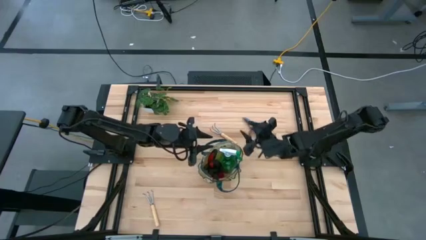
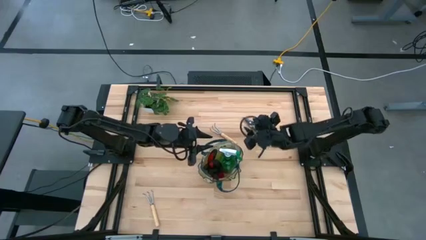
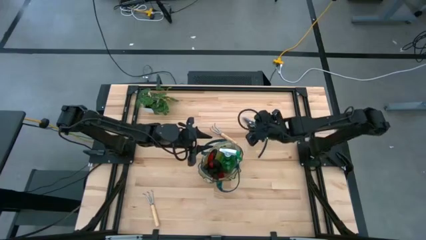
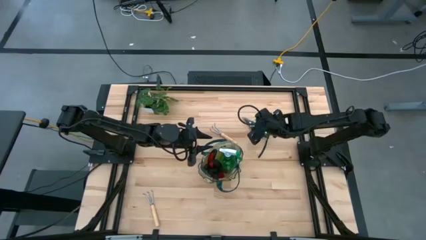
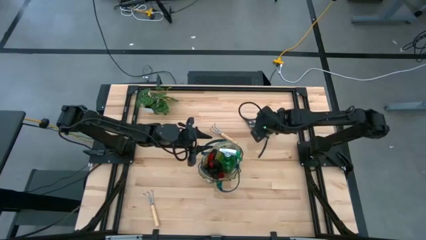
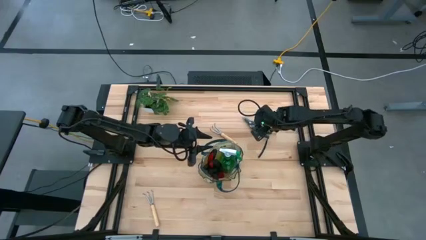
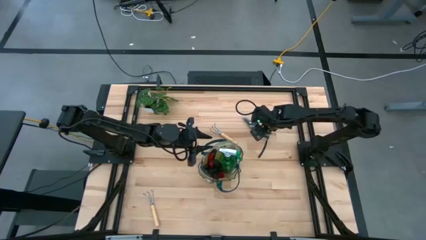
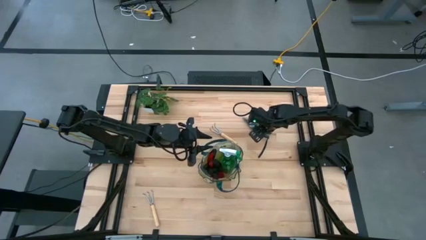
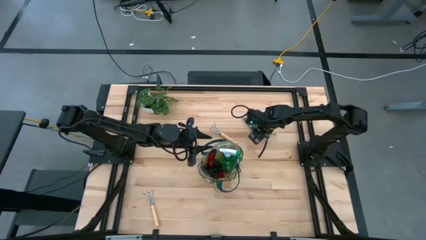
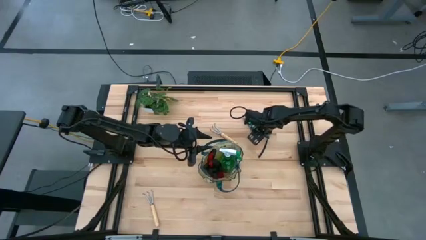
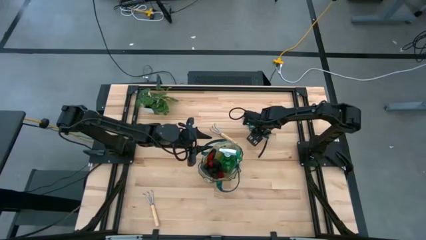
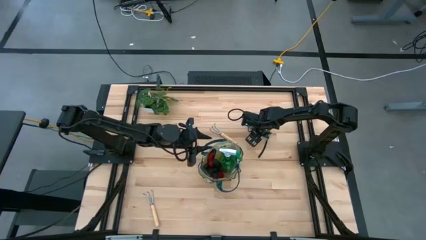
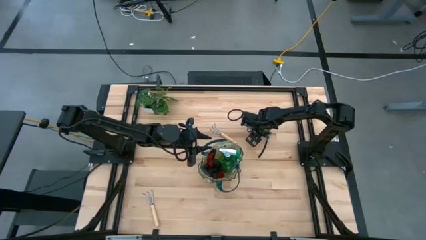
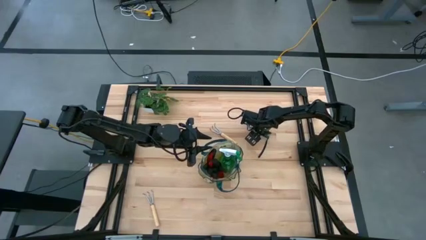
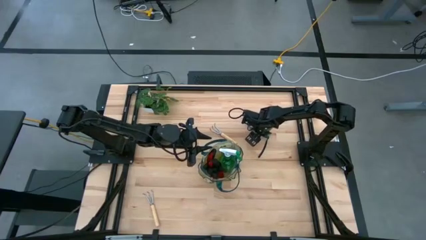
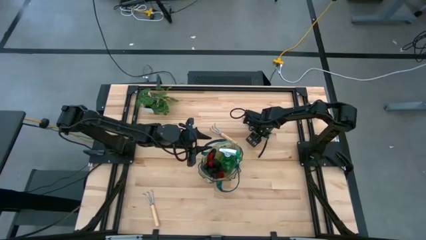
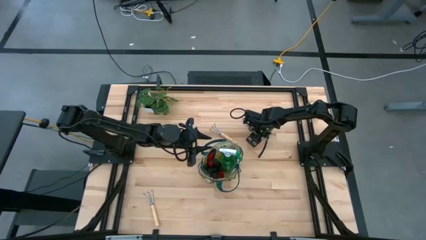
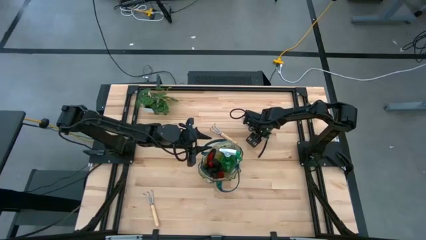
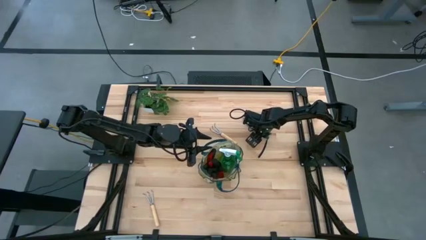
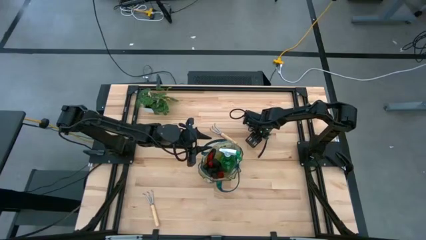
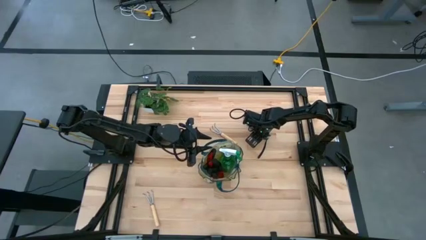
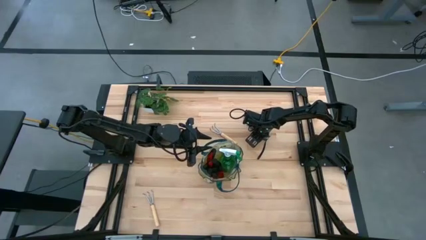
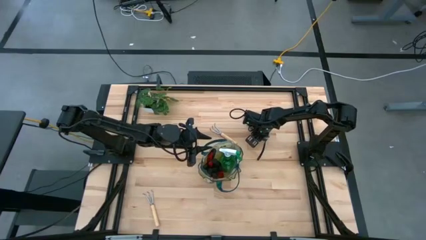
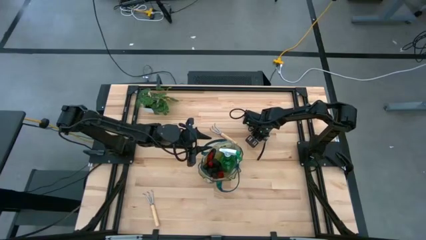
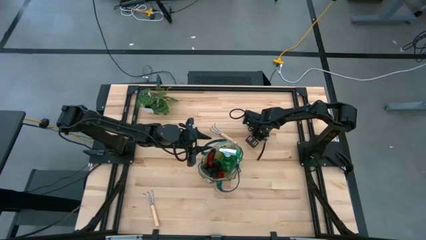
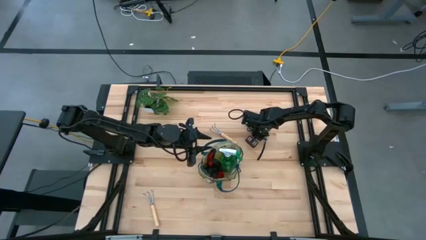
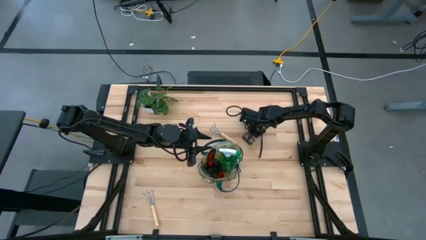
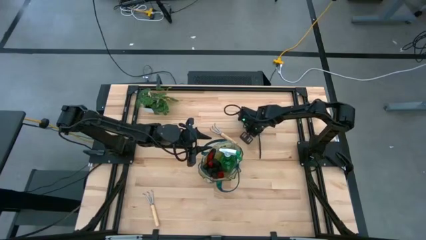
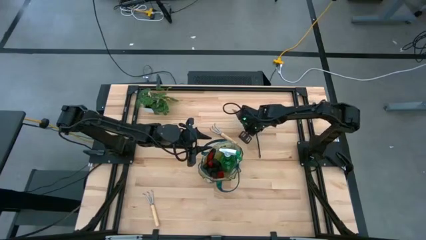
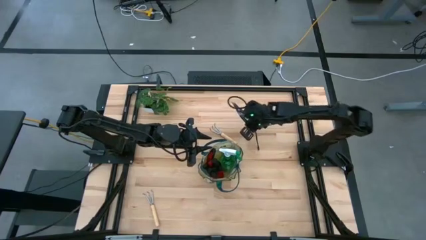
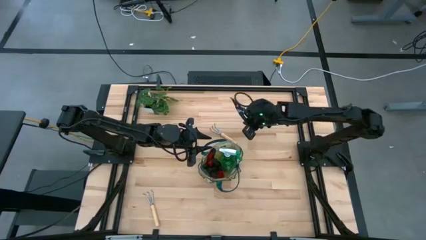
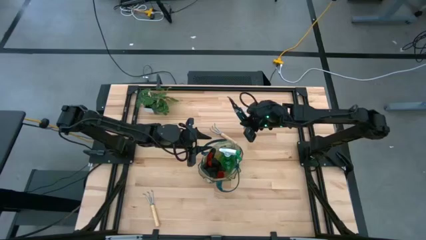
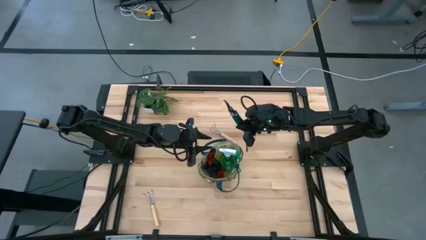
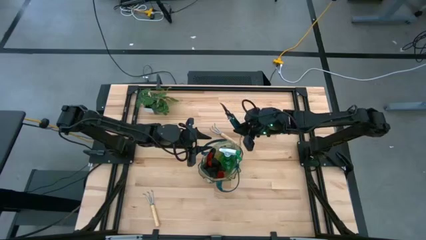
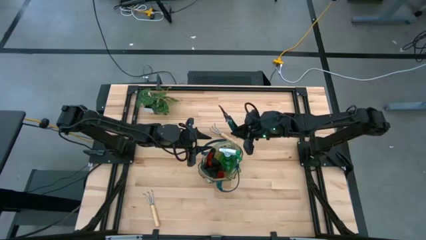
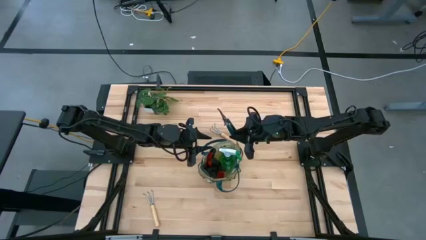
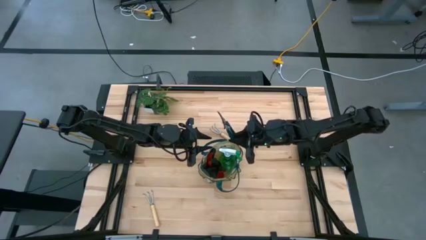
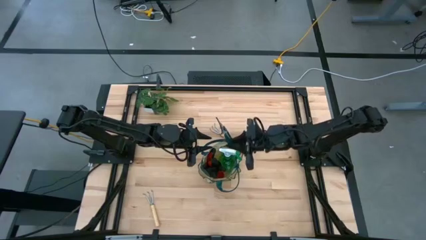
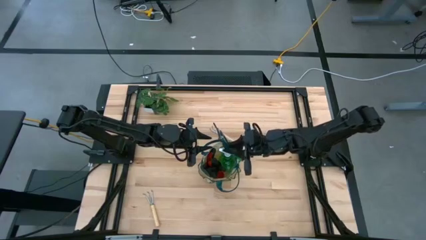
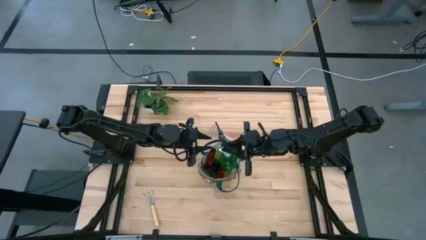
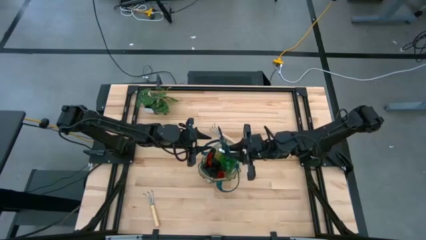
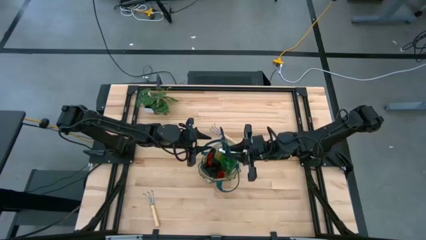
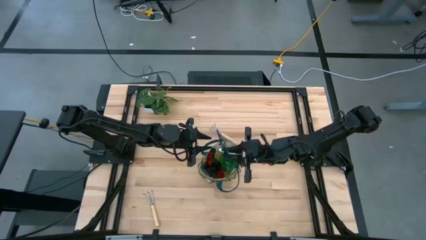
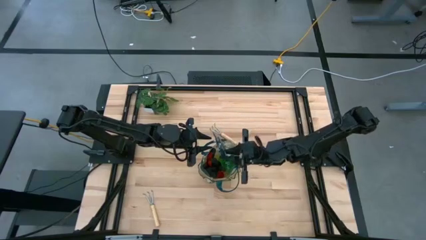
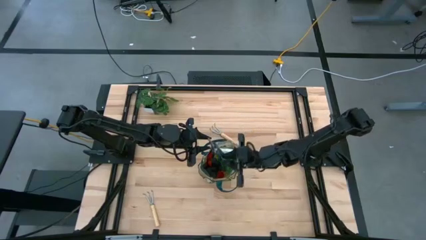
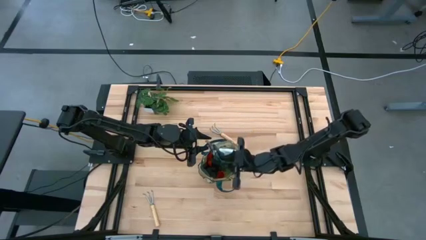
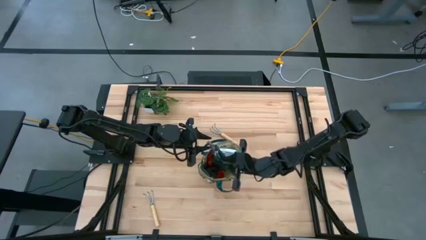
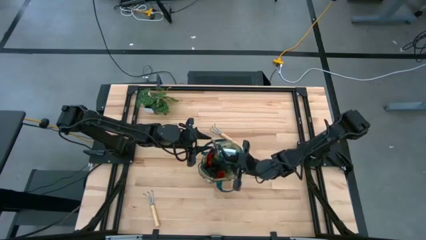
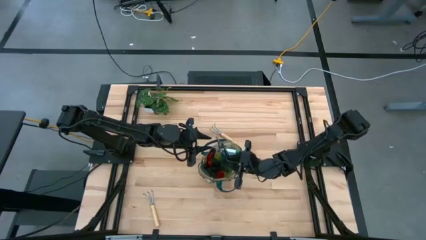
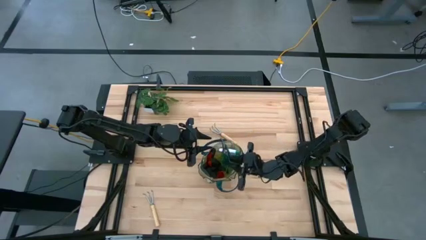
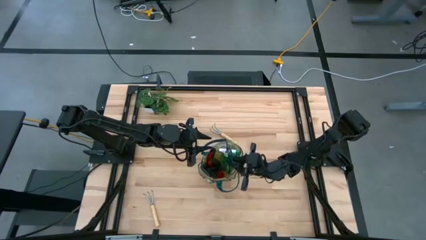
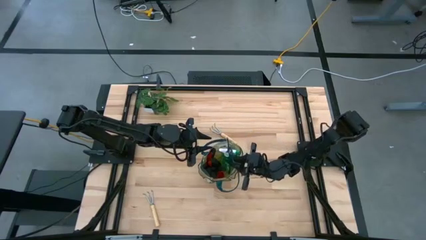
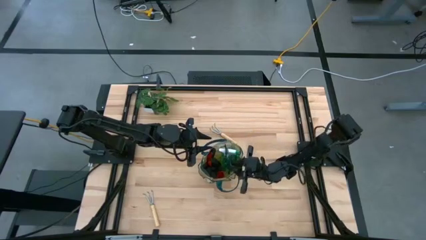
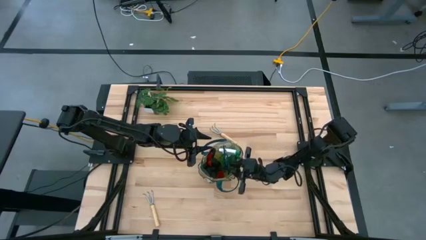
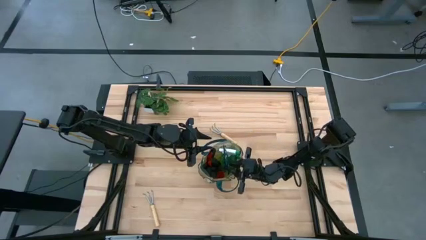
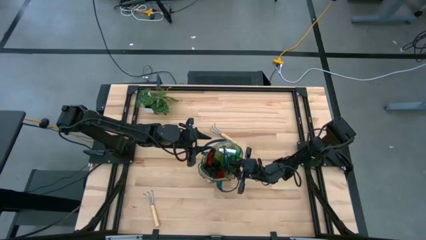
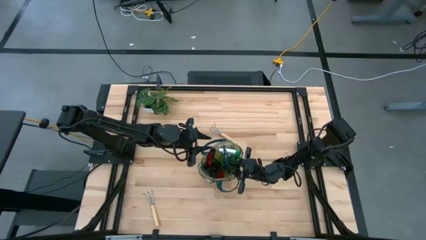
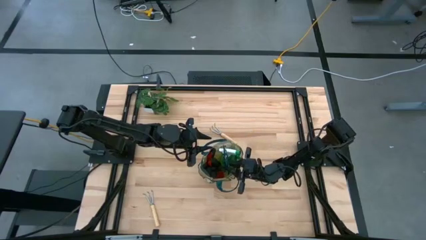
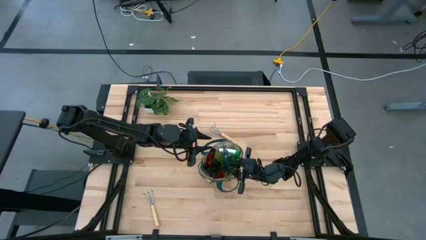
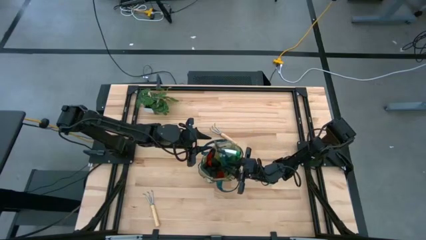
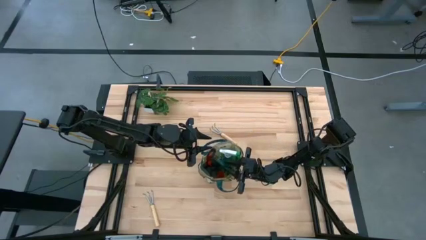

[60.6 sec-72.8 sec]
Task: Pick & Place Garden tools in Gardening bag
Put the green scissors into the green gardening bag

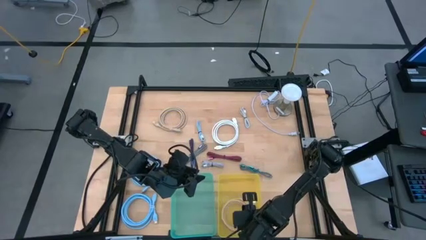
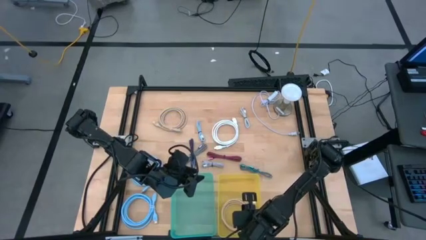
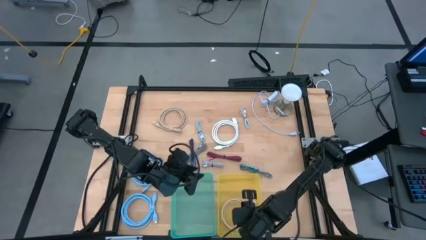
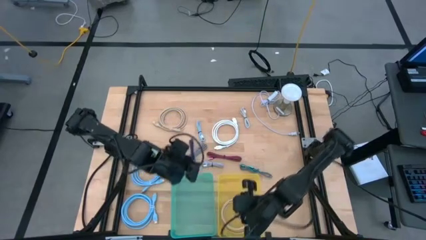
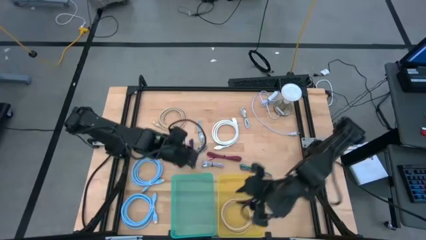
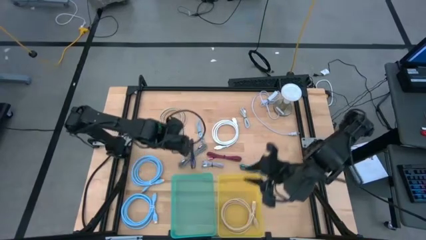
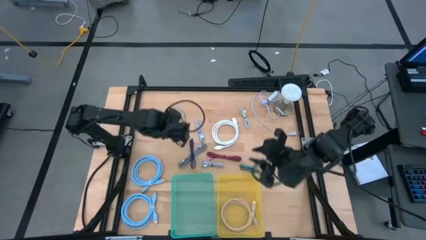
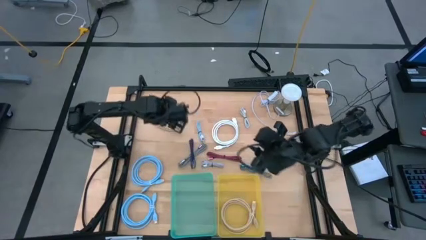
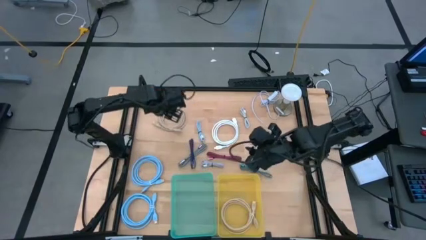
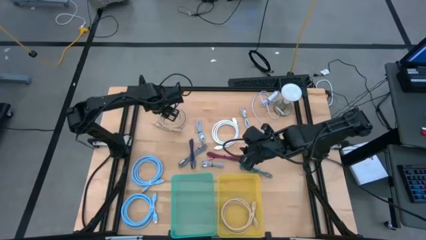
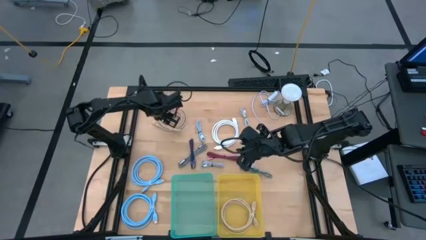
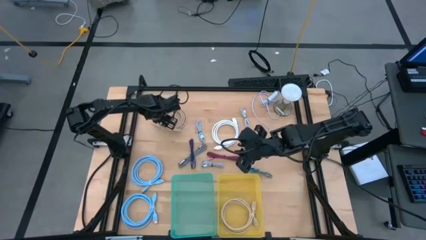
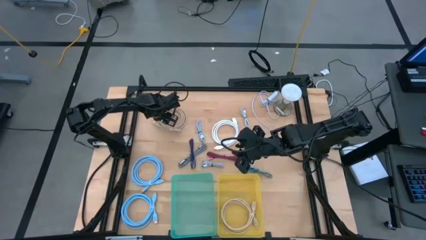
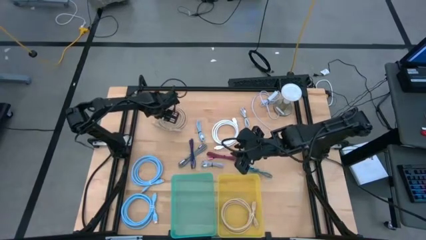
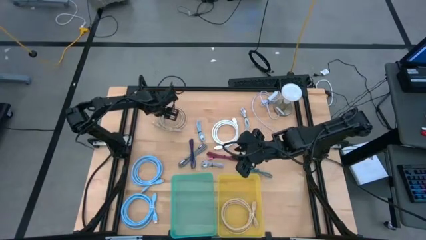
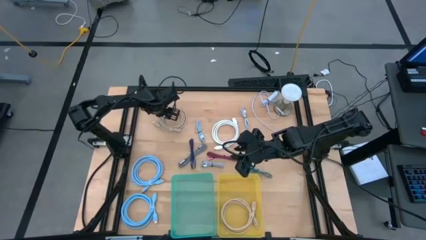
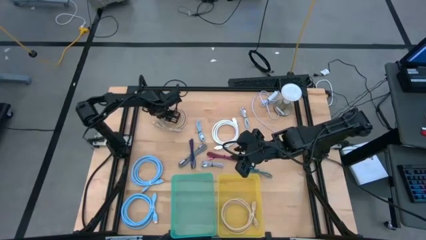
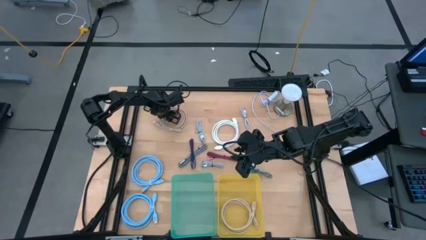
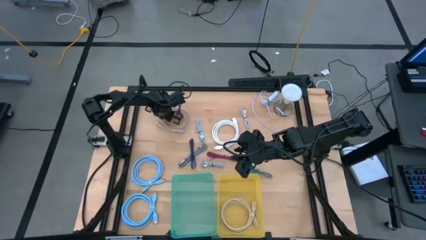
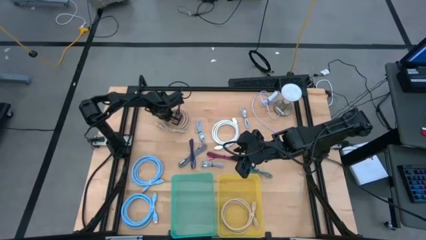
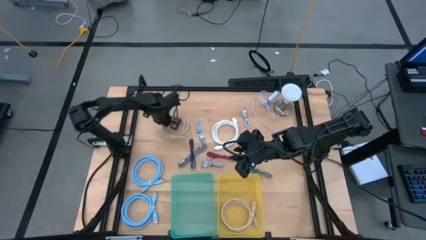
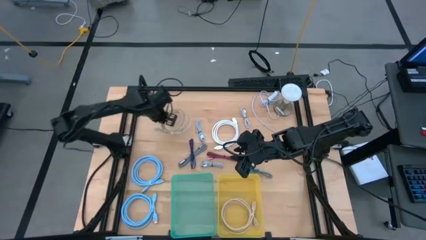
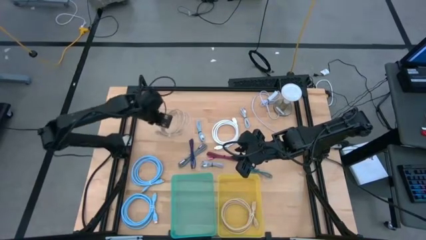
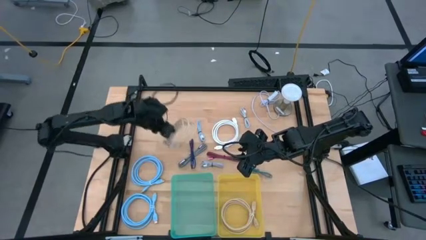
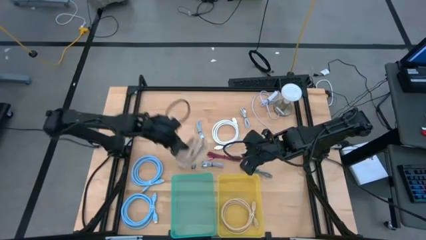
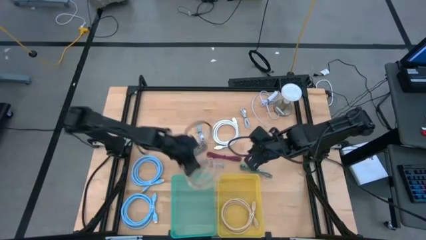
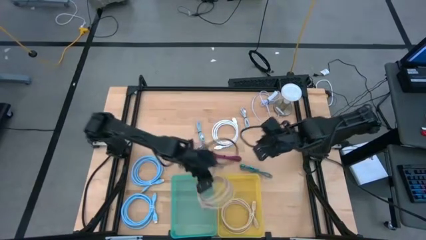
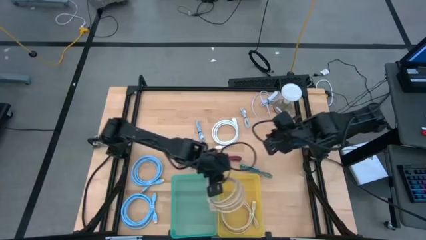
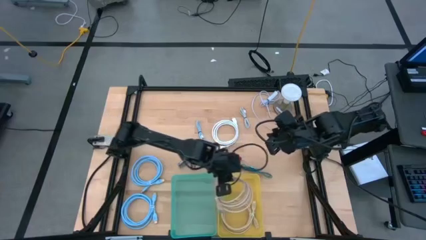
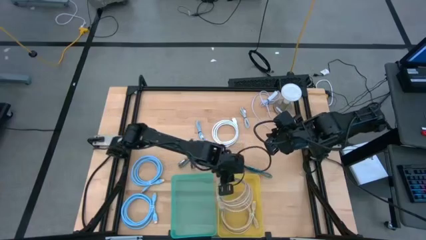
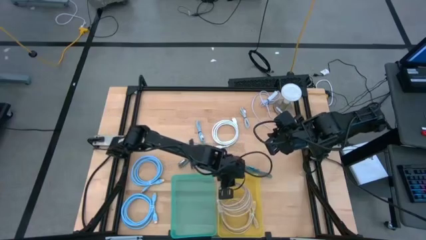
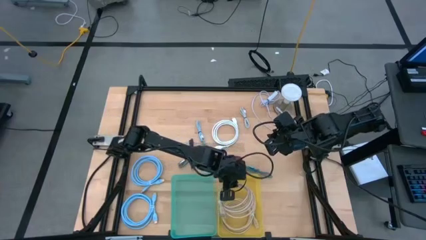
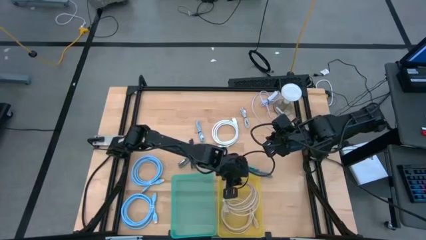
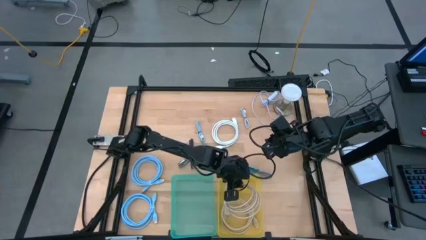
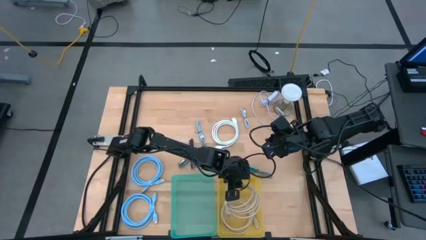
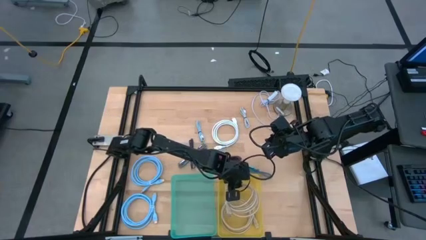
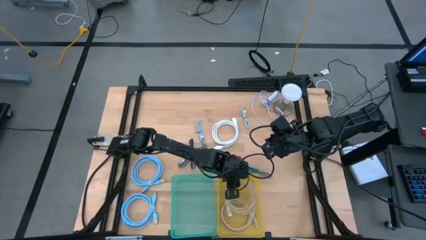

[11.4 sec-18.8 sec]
Task: Pick & Place USB Port
Put the brown HDMI cable into the yellow bin
